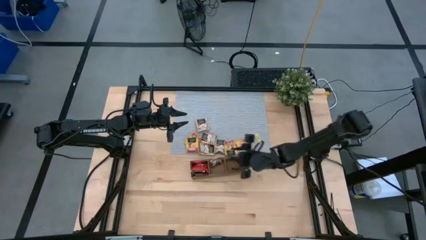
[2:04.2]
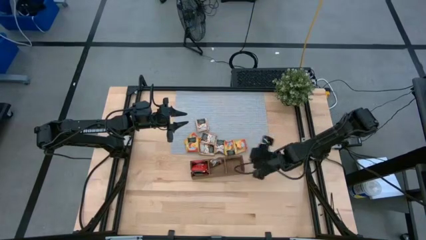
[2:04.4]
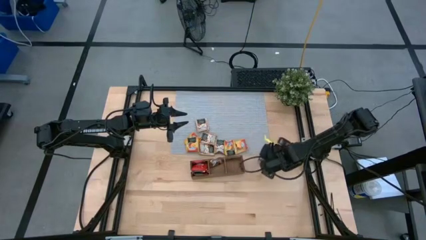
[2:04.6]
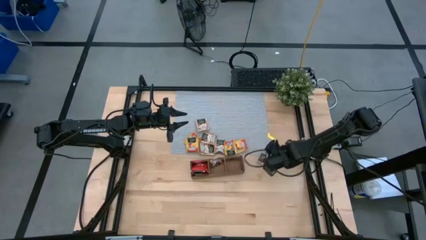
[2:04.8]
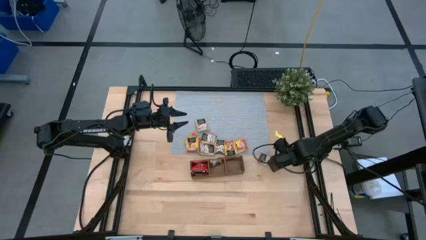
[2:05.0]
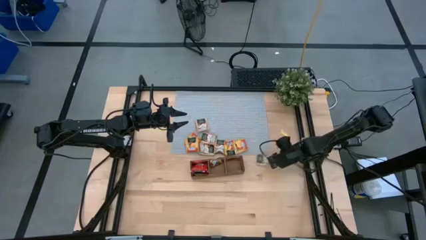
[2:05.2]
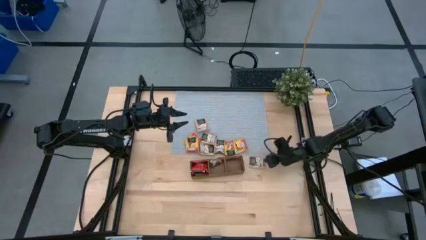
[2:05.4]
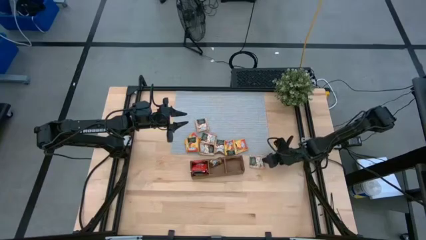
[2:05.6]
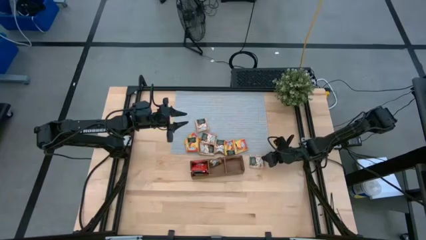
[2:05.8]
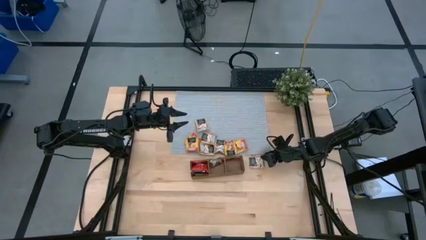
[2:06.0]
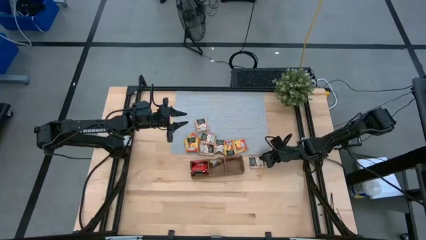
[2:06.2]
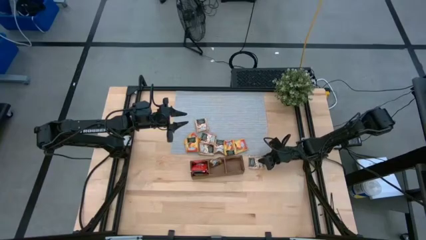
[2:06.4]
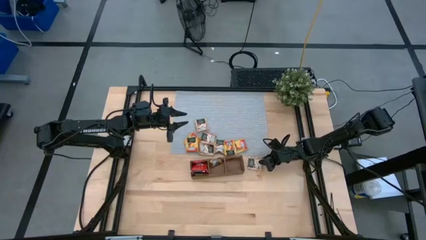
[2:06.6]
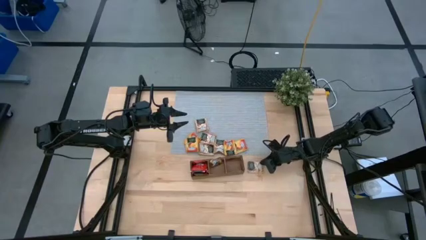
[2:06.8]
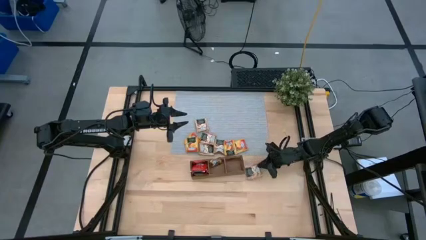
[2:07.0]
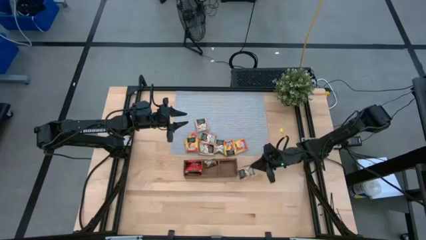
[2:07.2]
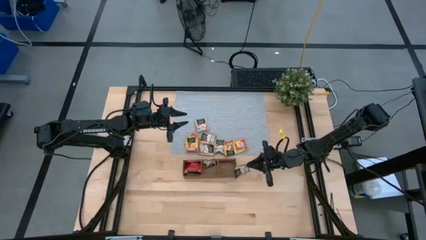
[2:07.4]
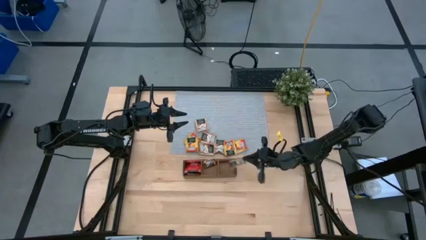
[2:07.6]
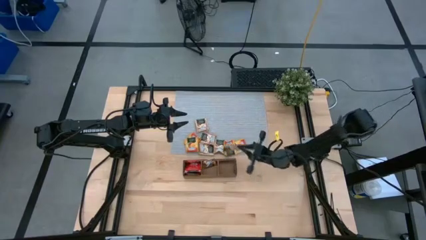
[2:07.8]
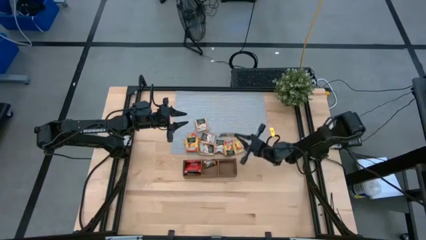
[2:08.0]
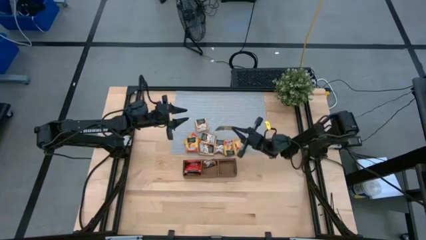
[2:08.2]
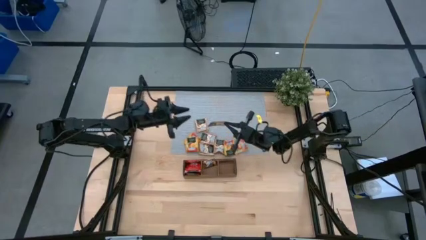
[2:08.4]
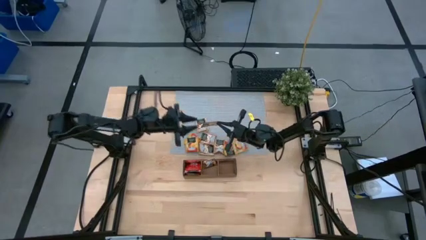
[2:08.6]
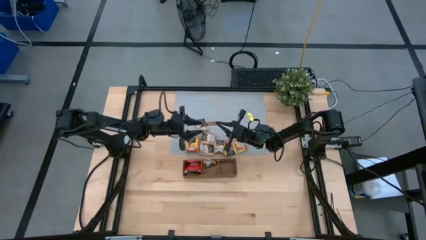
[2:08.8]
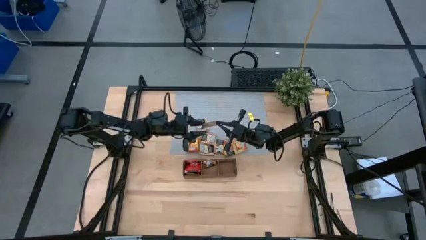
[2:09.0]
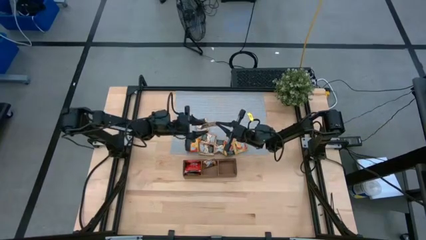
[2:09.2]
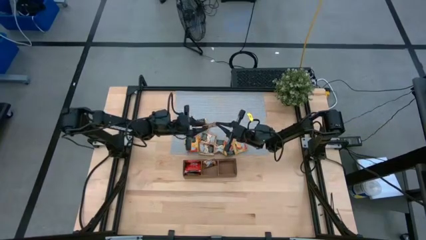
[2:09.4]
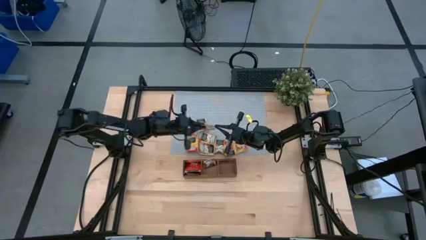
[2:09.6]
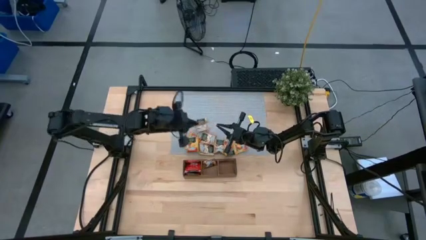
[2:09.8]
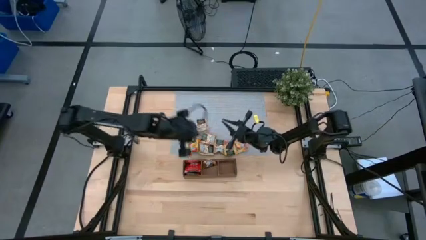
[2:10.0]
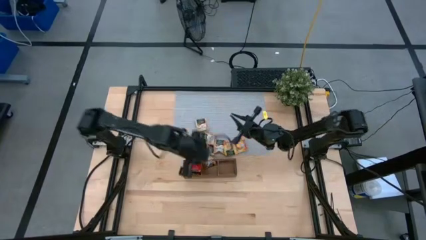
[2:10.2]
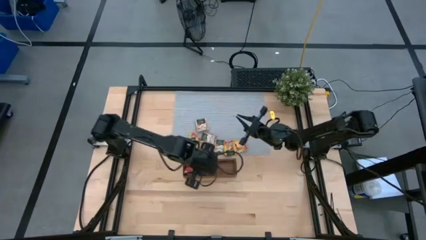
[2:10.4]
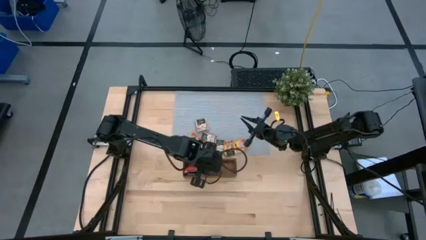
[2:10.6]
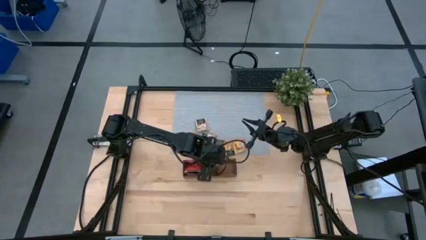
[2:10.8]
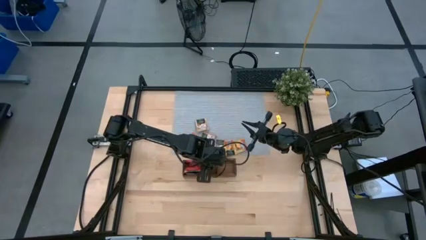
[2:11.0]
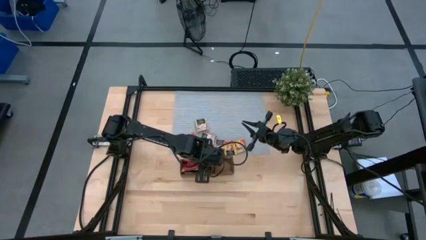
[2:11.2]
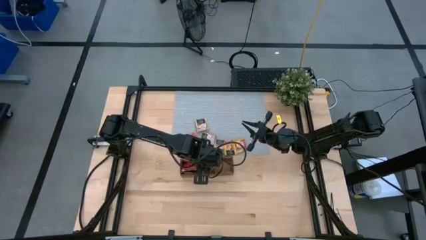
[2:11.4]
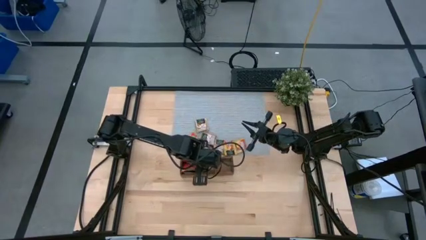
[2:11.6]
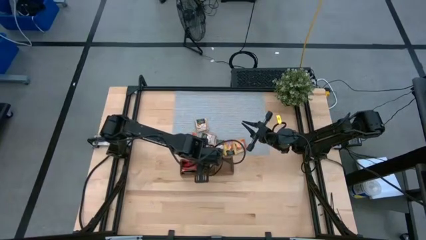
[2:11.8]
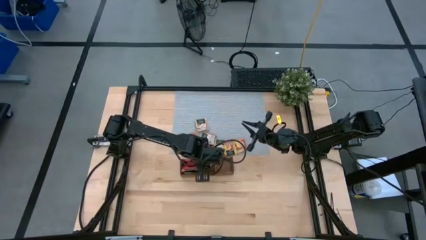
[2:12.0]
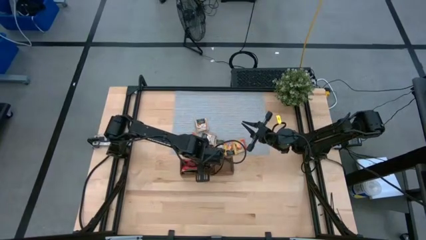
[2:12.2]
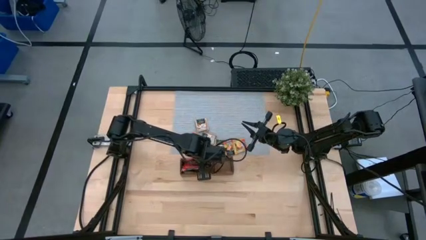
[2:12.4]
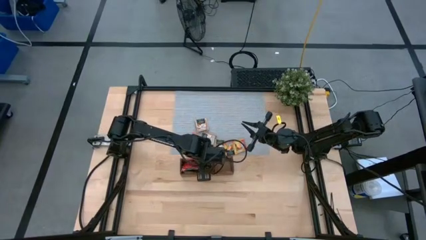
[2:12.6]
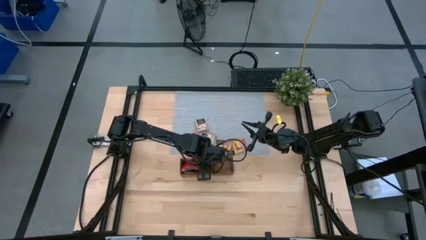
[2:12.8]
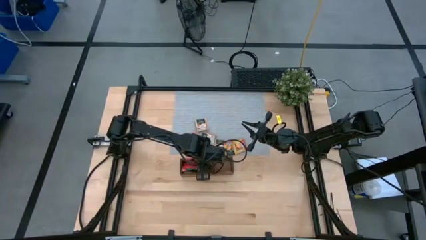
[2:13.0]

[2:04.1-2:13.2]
Task: Pick & Place Tea
Put the brown tea bag into the middle section of the wooden organizer

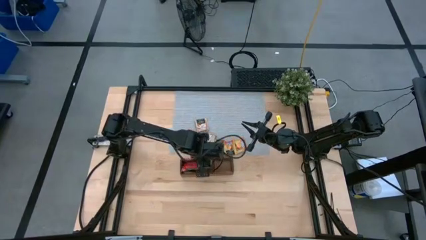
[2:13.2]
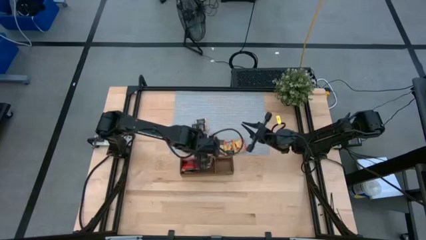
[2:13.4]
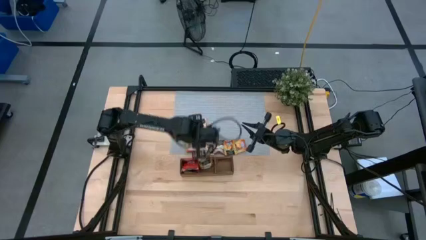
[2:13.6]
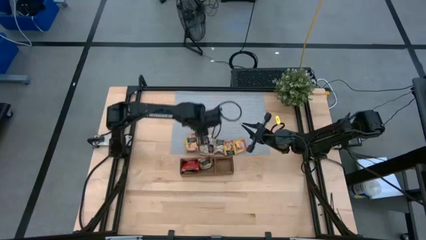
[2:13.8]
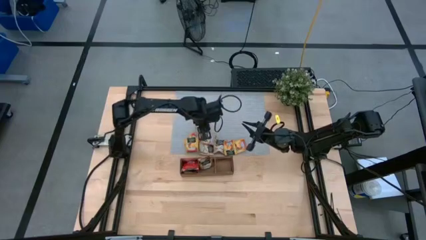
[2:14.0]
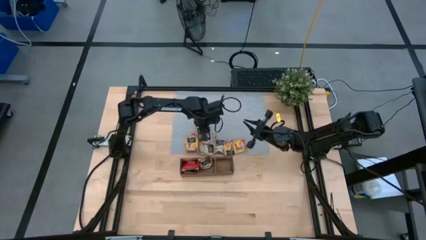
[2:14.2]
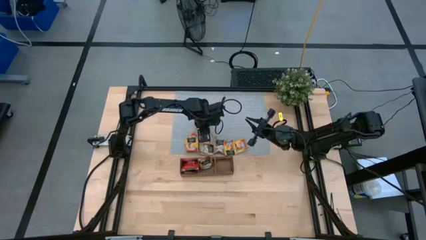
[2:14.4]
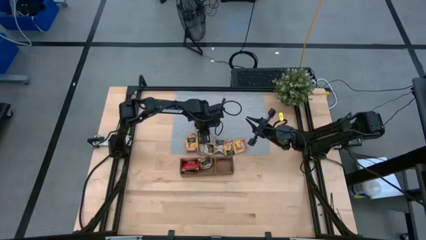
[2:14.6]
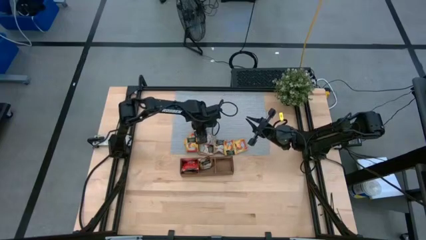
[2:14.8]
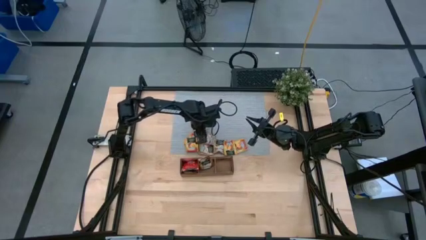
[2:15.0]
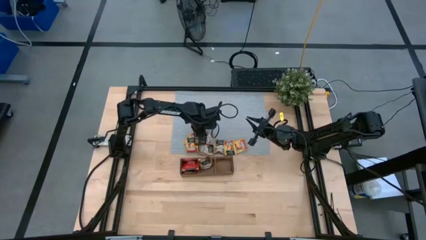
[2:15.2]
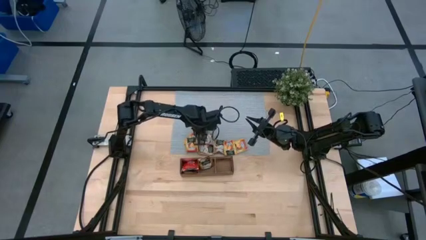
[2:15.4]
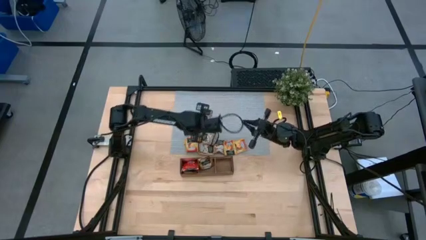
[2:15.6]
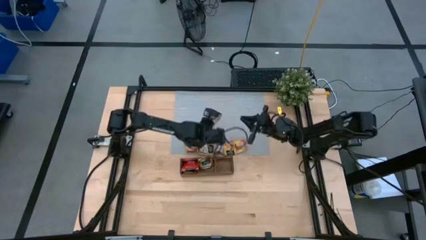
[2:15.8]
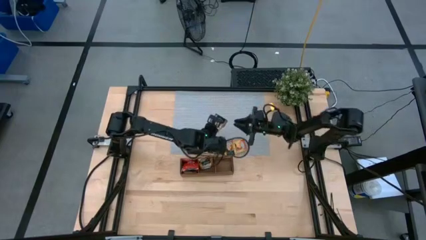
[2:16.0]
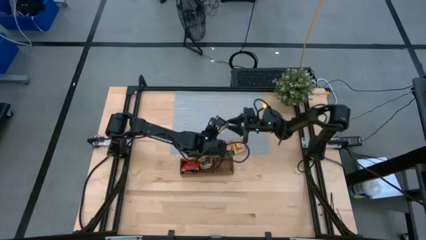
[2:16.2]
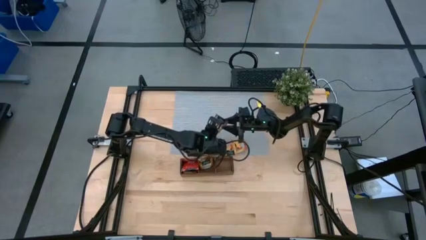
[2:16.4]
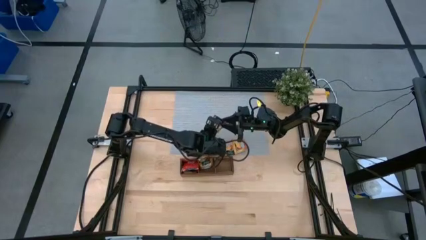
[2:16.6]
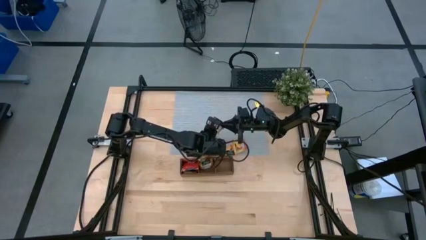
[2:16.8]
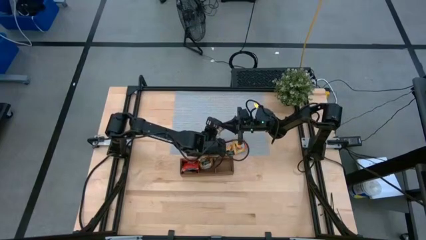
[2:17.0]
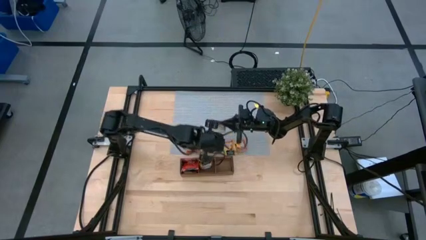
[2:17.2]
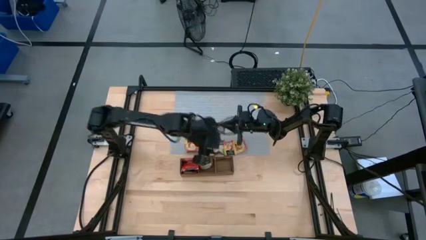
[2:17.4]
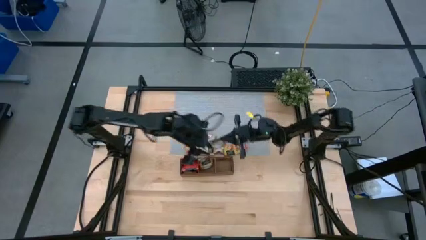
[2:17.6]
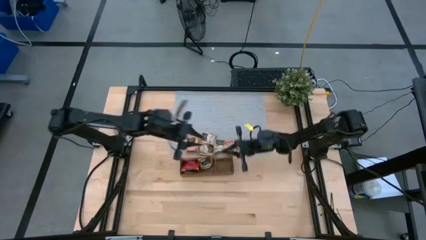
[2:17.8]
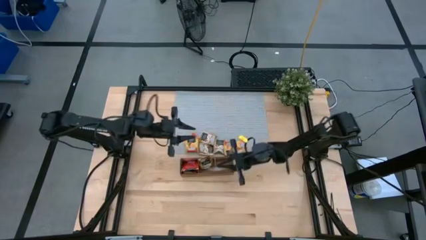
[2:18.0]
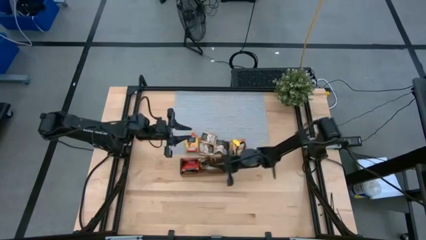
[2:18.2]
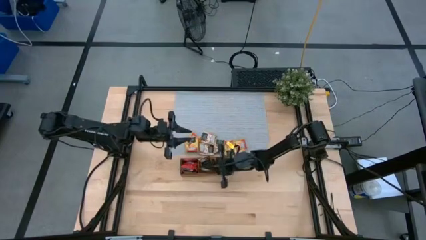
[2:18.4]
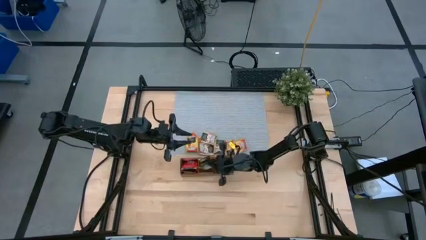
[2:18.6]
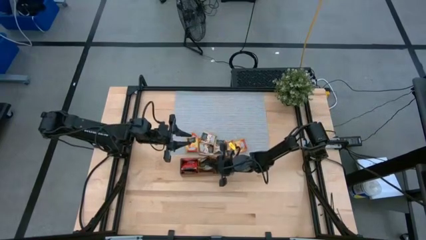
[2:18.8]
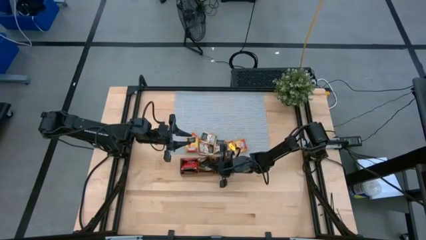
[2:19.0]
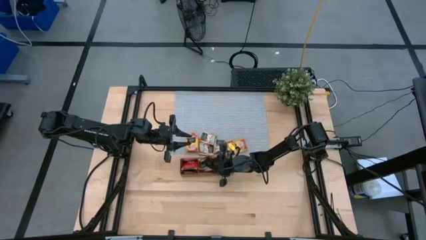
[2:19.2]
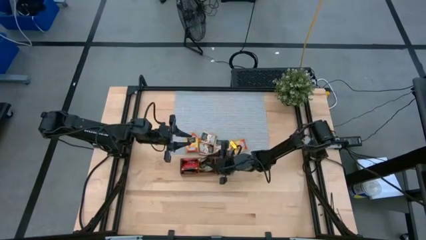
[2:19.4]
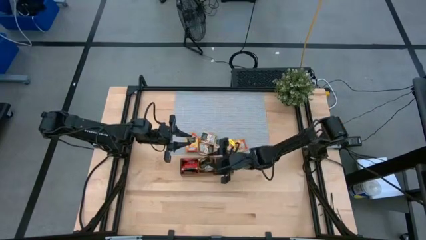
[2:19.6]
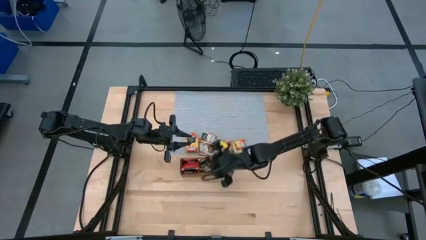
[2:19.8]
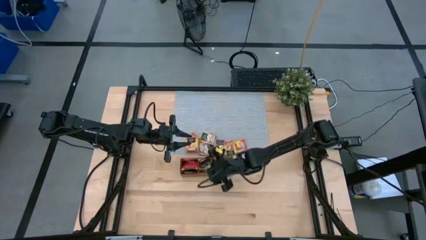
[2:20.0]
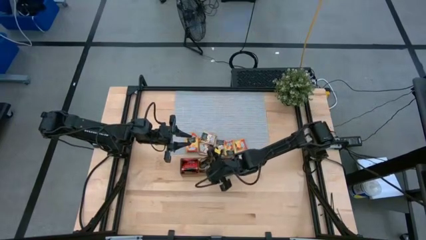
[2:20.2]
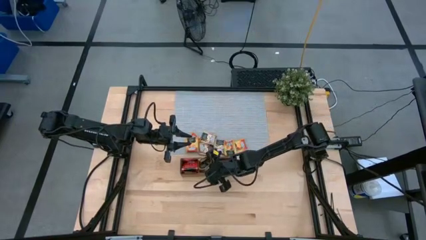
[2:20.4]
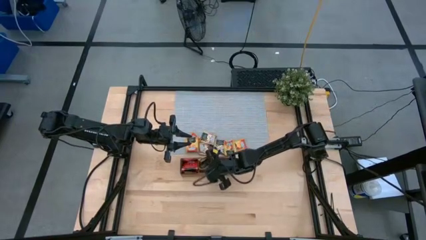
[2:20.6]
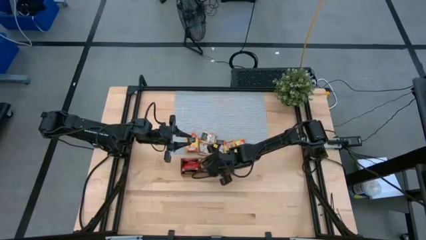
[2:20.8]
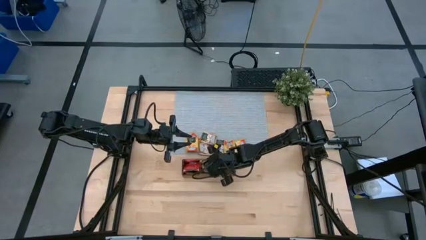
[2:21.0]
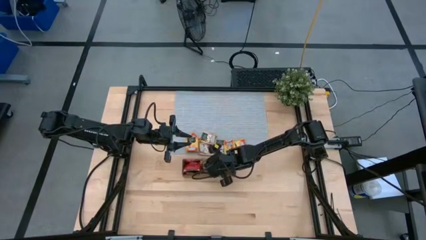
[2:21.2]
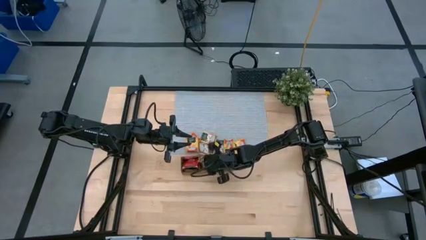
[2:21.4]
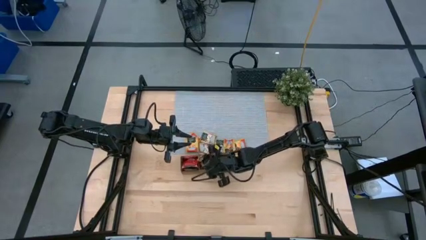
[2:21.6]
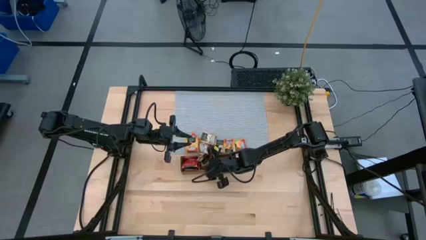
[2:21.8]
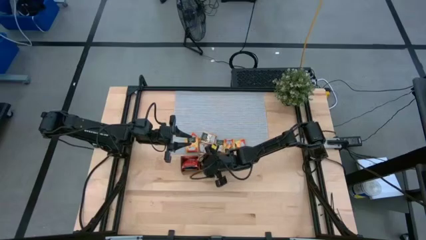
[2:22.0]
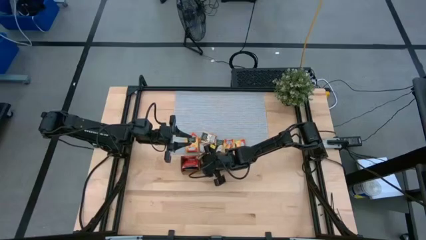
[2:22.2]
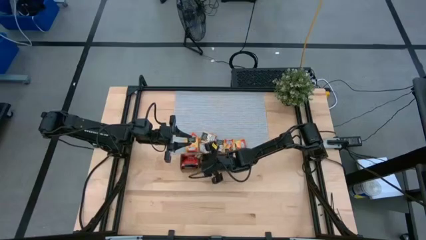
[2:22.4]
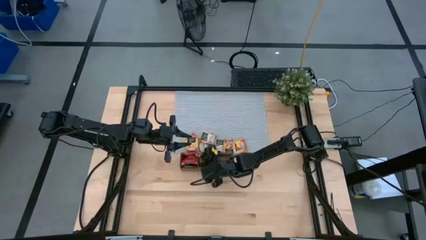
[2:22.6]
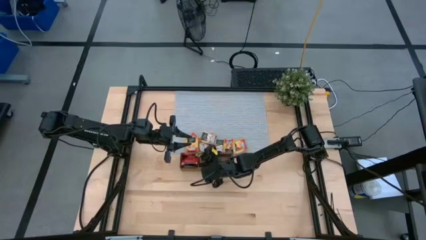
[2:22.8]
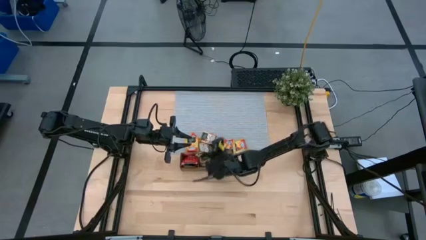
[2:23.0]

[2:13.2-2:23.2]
Put the brown tea bag into the middle section of the wooden organizer
